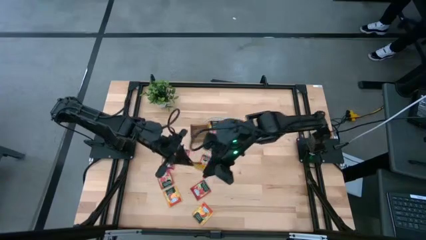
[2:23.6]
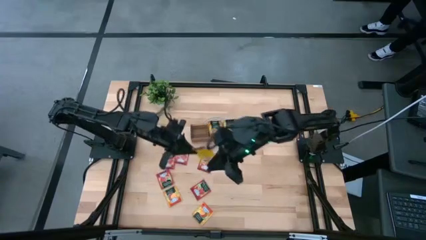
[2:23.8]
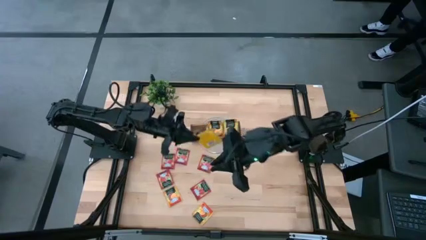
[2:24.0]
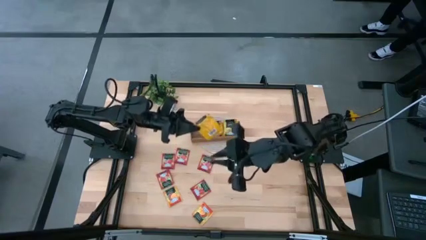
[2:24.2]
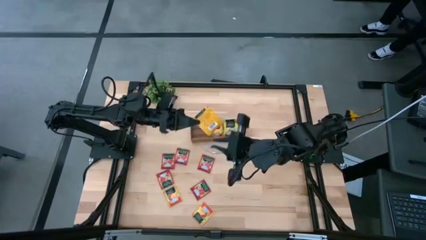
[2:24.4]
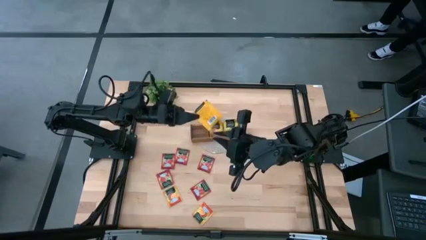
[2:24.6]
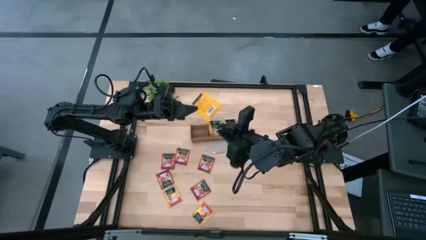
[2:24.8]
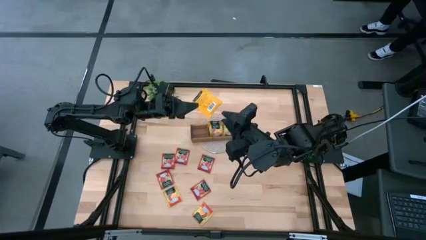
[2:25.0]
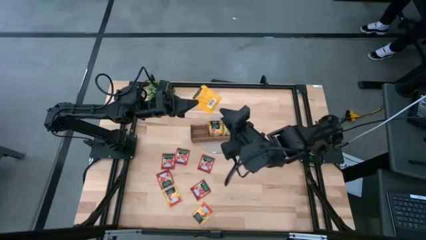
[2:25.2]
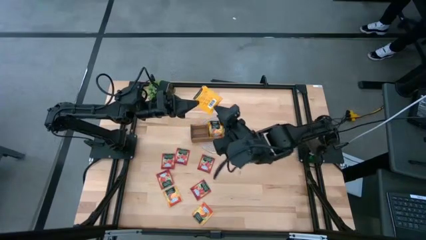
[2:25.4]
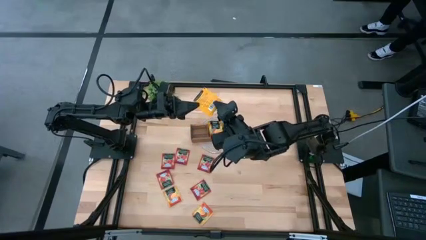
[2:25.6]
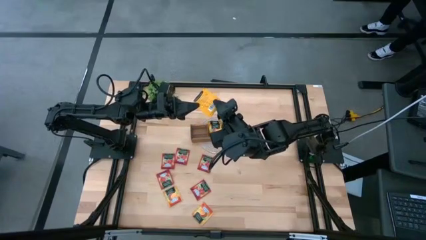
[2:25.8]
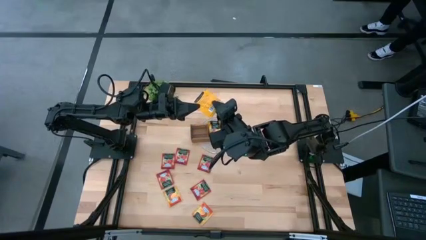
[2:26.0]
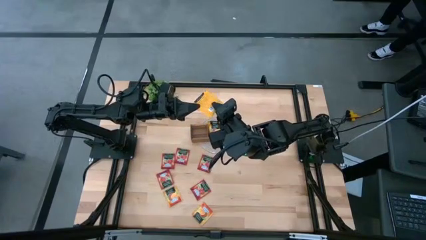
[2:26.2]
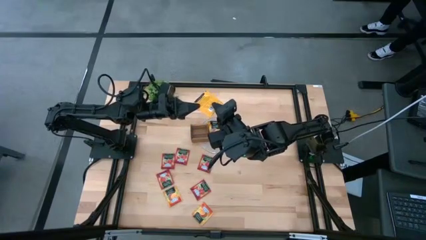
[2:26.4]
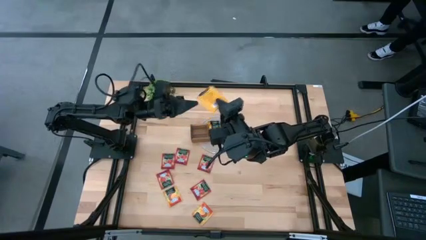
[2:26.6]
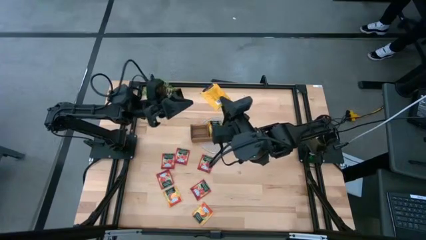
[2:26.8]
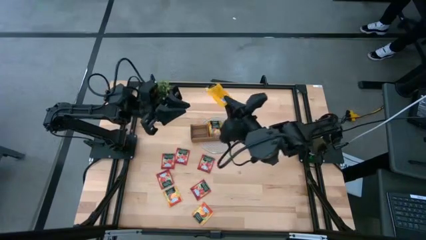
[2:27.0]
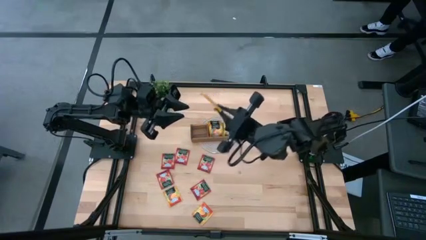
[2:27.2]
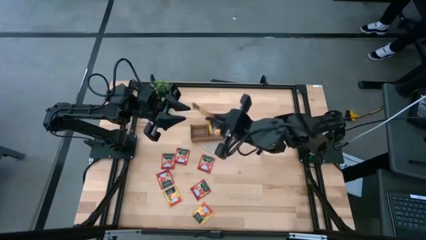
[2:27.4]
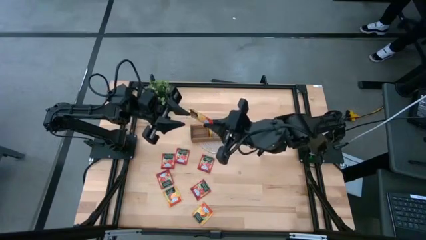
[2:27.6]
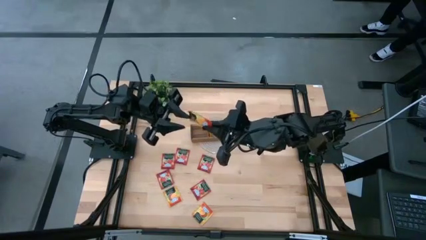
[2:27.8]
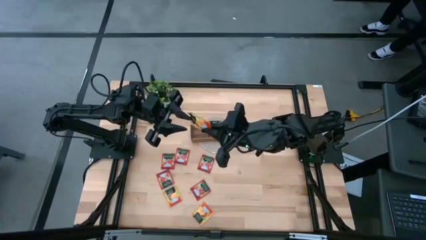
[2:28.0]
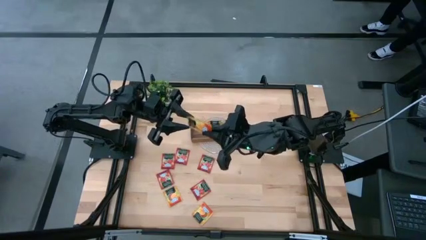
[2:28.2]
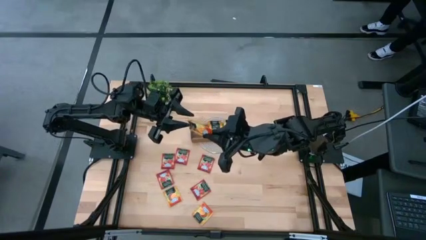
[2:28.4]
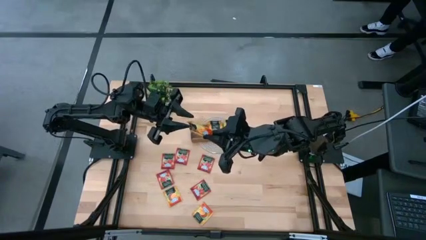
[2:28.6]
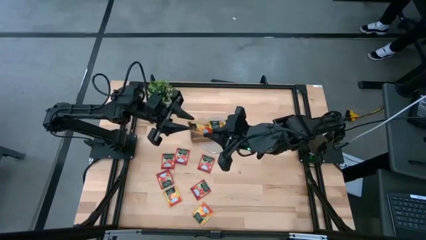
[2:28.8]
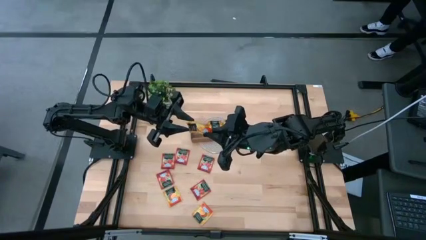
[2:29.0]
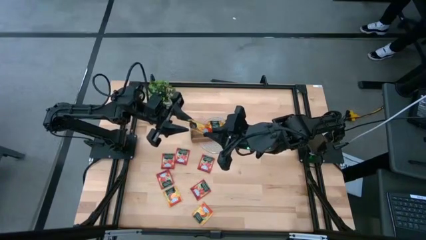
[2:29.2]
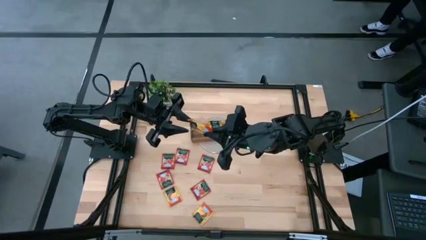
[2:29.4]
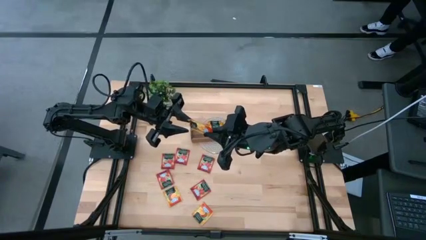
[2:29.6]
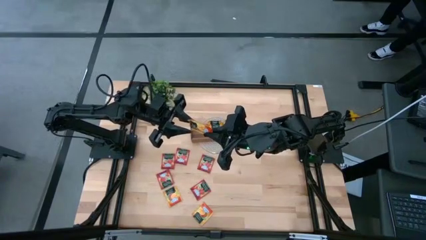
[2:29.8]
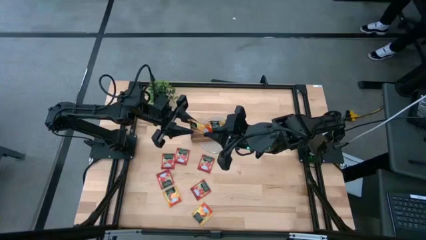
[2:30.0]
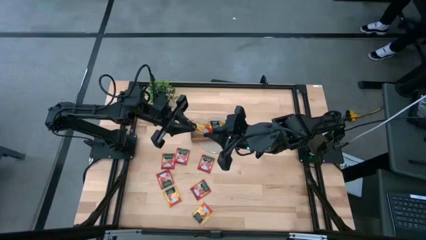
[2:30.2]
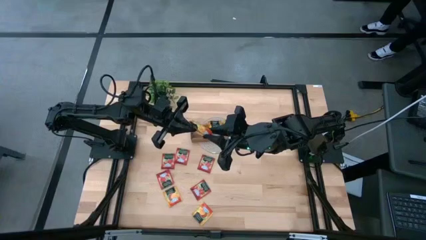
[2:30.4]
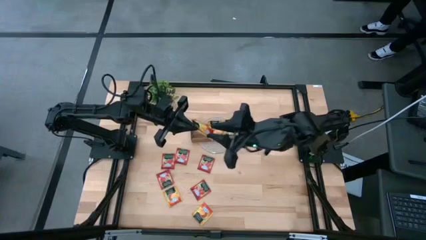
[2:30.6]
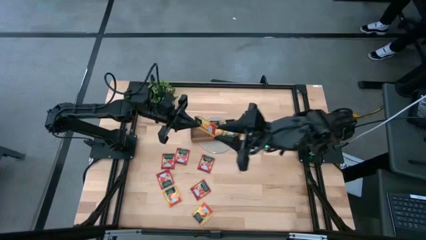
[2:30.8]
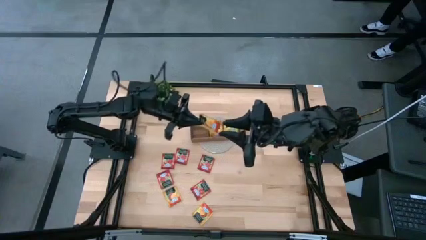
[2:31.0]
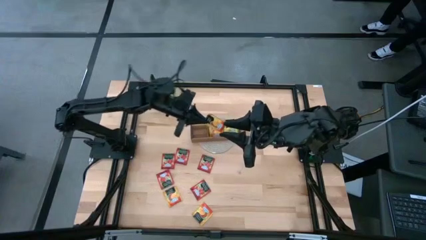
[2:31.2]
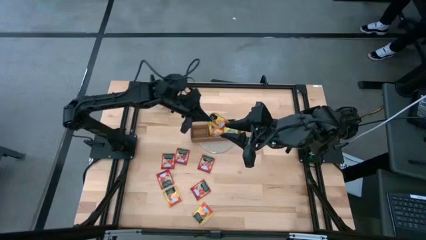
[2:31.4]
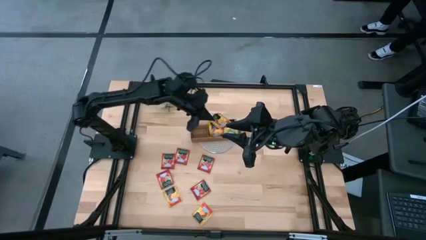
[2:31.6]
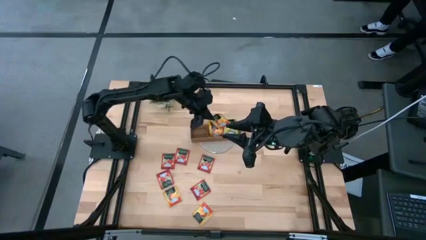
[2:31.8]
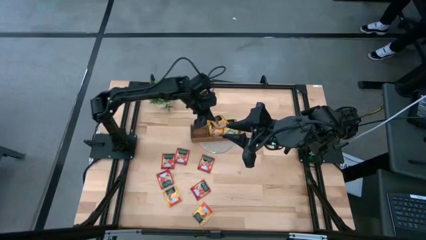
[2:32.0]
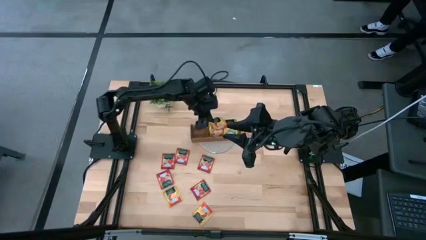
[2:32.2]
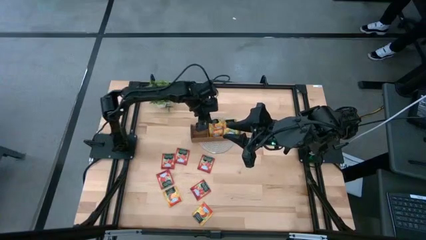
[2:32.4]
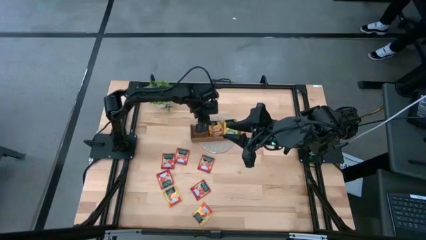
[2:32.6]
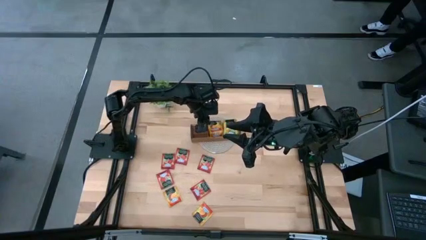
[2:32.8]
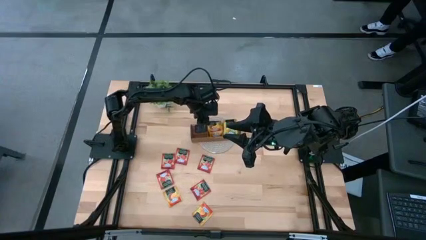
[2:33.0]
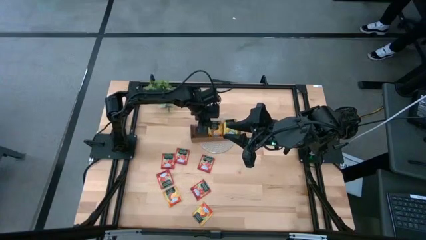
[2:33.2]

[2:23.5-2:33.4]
Task: Pick & Place Tea
Put the orange tea bag into the middle section of the wooden organizer

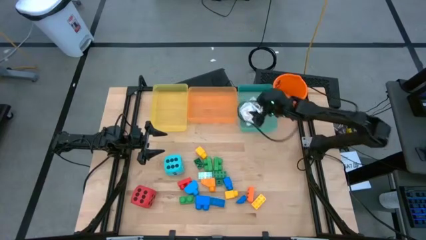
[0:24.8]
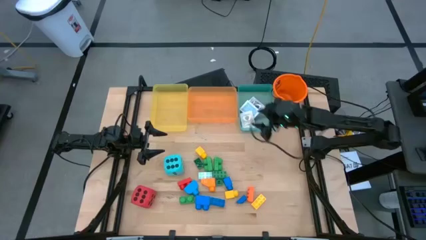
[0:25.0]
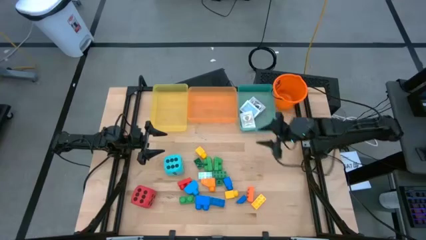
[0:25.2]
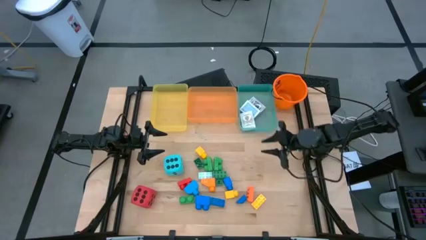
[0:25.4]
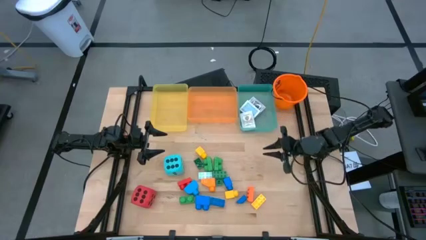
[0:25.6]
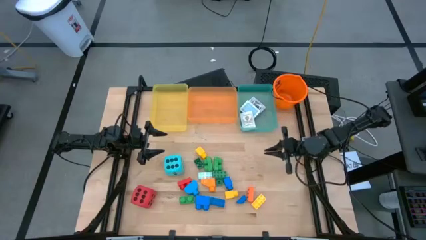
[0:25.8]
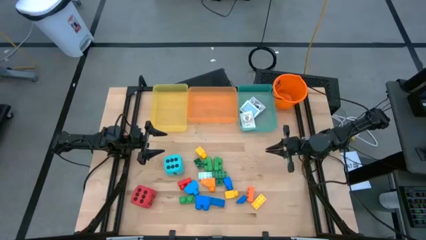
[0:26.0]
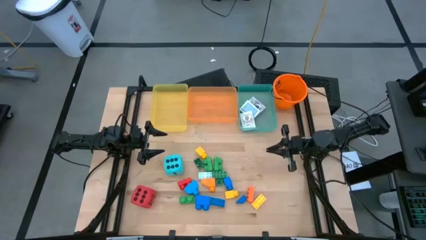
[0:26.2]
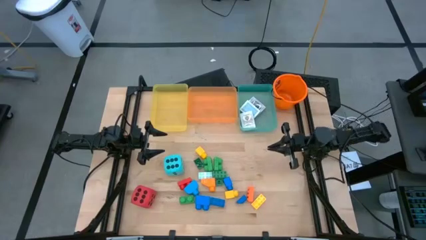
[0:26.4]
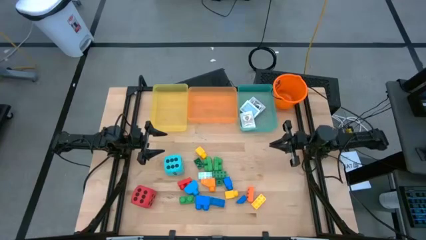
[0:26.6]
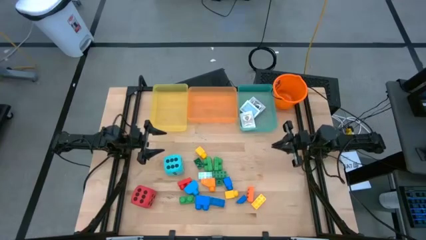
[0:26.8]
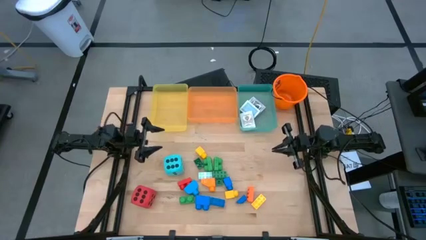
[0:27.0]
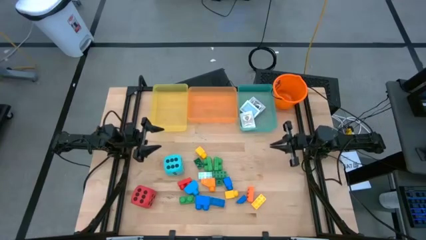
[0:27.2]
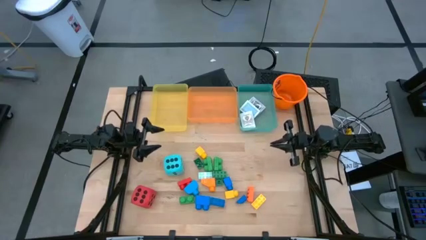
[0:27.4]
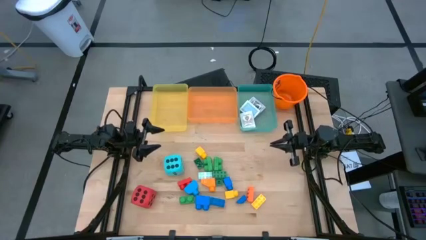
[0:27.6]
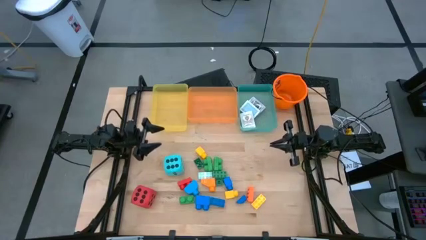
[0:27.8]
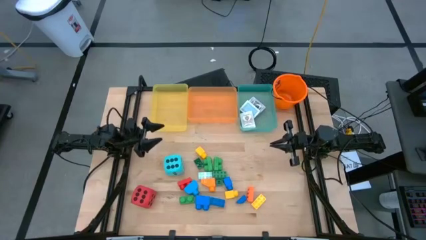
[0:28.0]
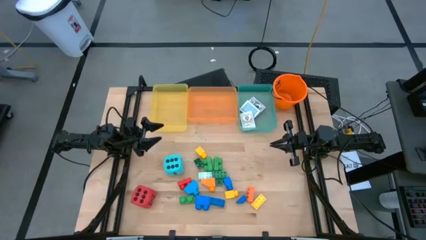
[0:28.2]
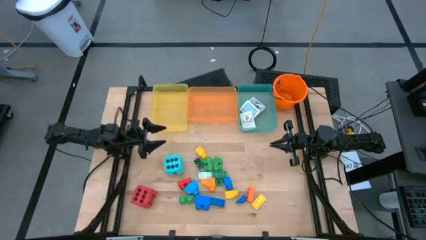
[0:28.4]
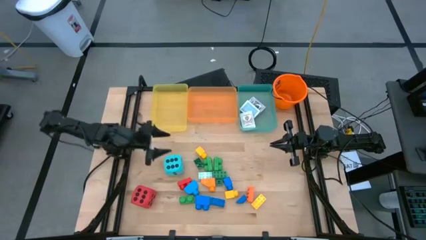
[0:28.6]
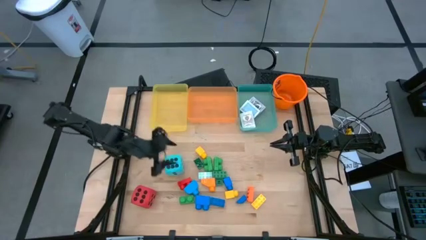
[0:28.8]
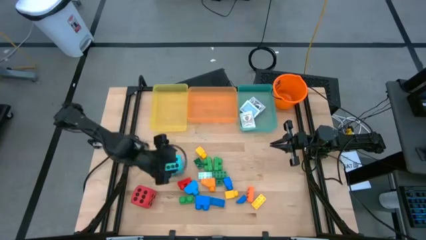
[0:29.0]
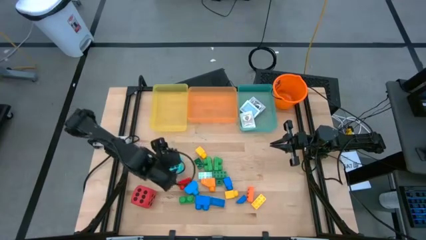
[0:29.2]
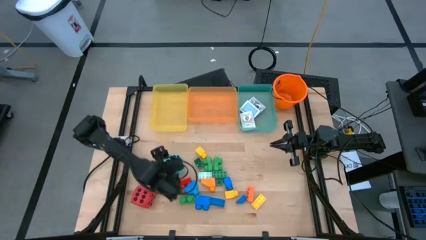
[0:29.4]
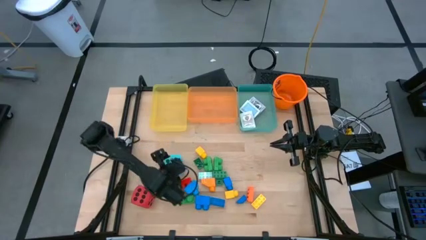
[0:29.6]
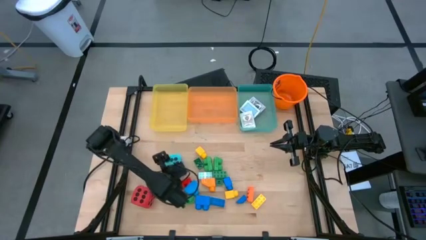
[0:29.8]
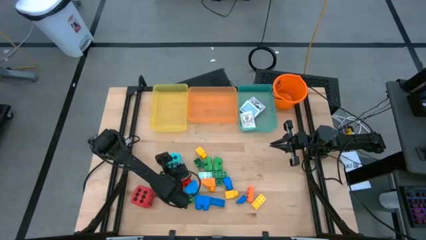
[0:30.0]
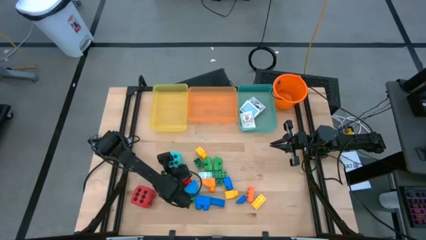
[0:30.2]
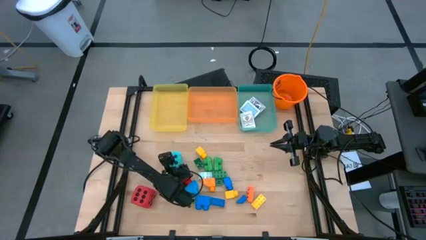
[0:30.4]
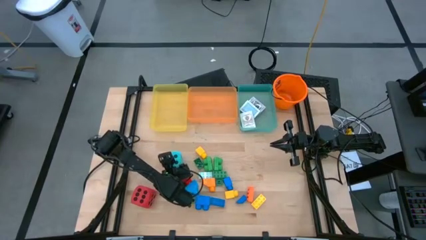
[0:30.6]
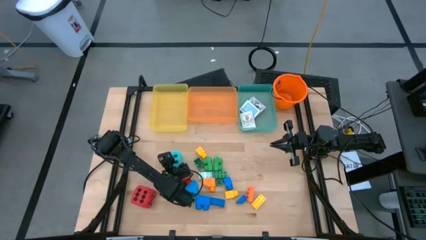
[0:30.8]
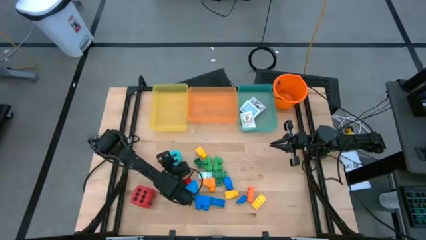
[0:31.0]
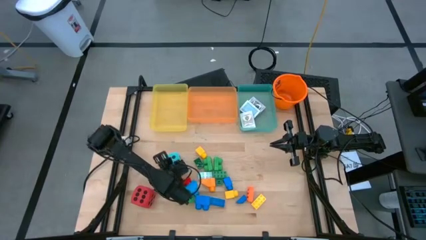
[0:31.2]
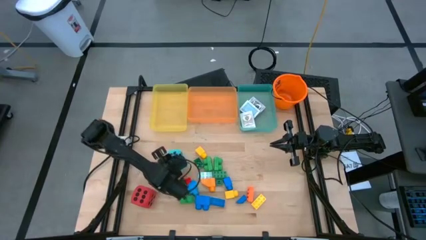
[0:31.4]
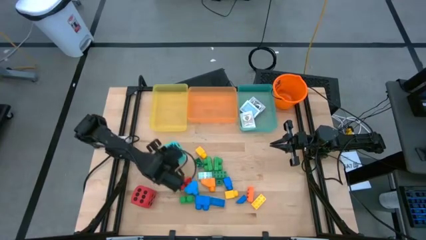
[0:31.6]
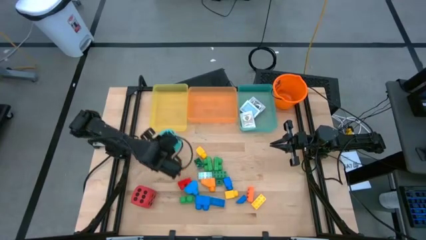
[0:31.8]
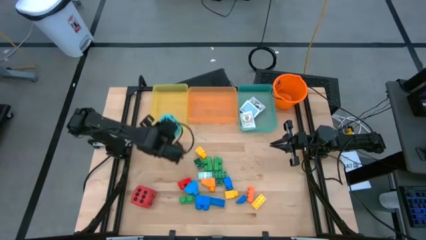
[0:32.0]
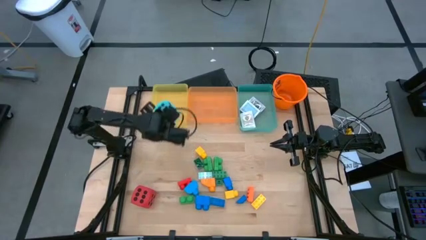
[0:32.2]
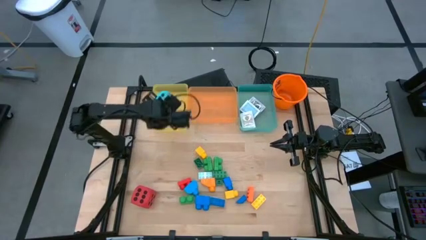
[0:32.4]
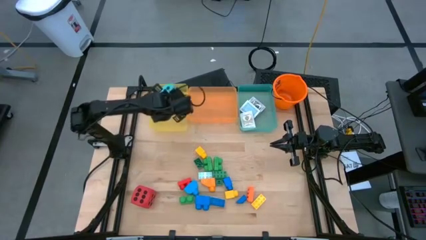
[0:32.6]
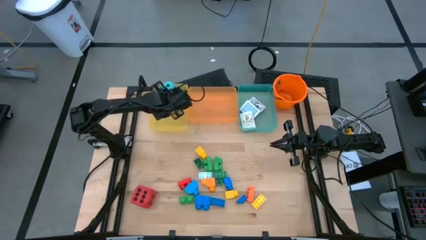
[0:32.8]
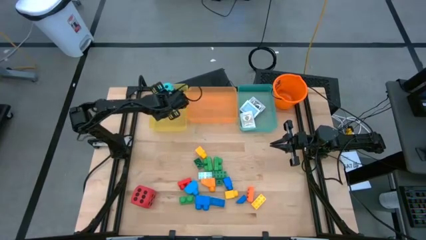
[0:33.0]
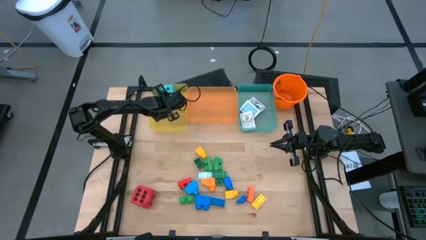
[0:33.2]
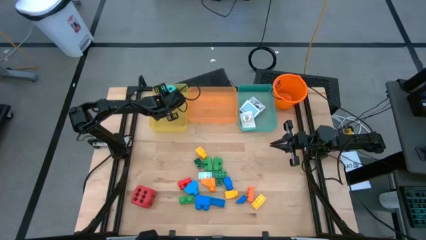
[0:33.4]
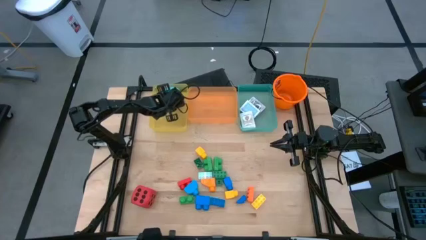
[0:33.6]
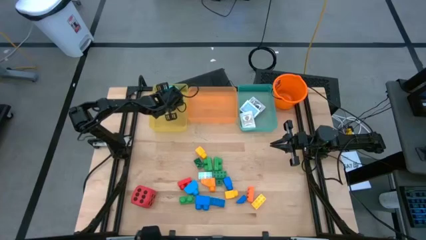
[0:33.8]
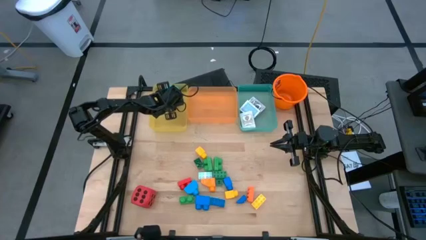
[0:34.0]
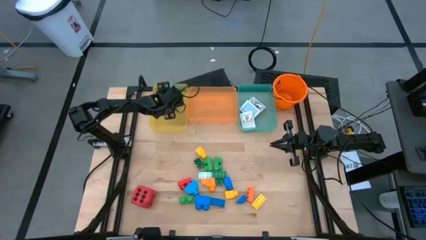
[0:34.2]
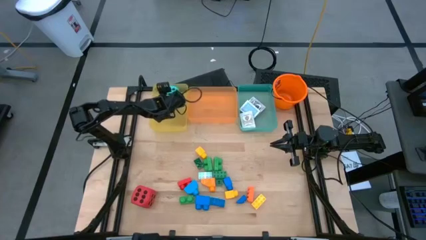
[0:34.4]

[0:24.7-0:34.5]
Task: Pick & Place Toys
Put the blue dice into the yellow bin
